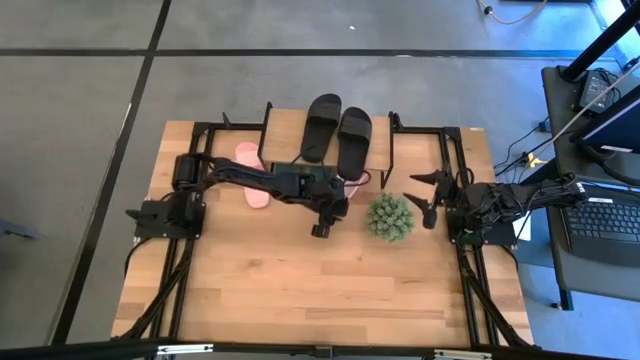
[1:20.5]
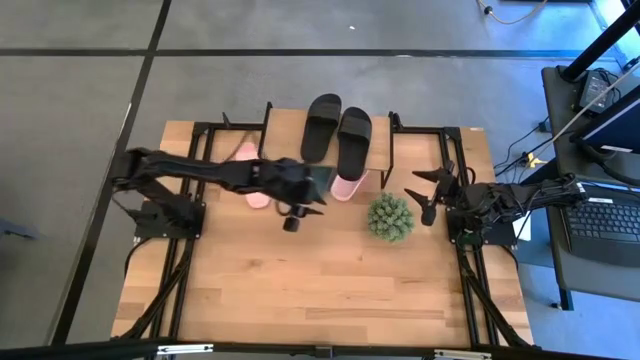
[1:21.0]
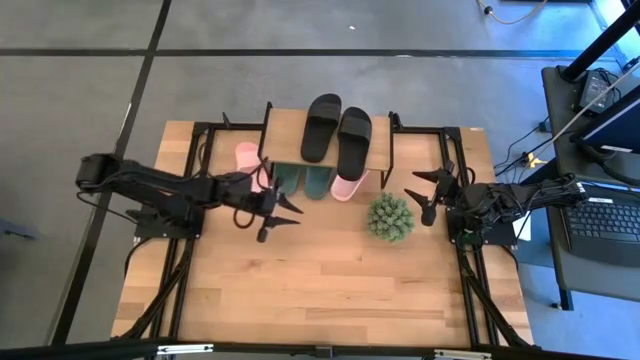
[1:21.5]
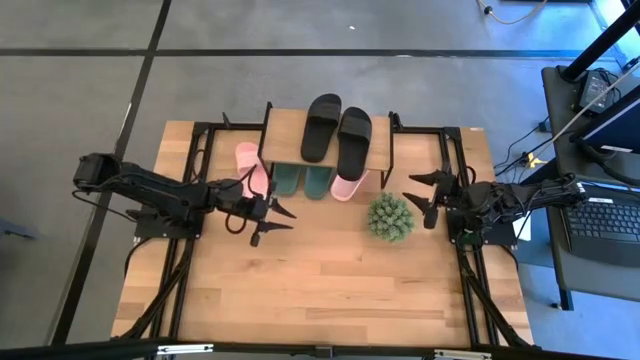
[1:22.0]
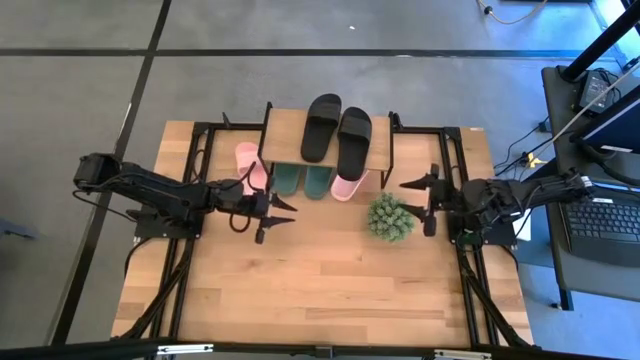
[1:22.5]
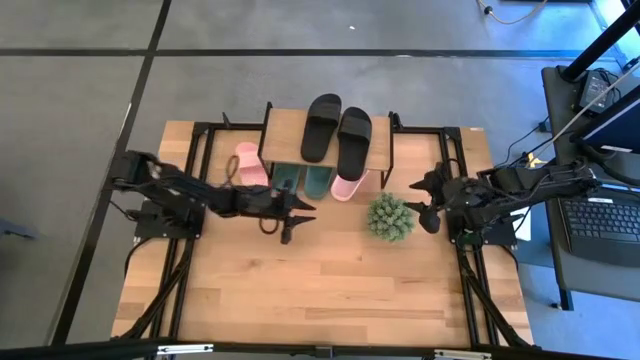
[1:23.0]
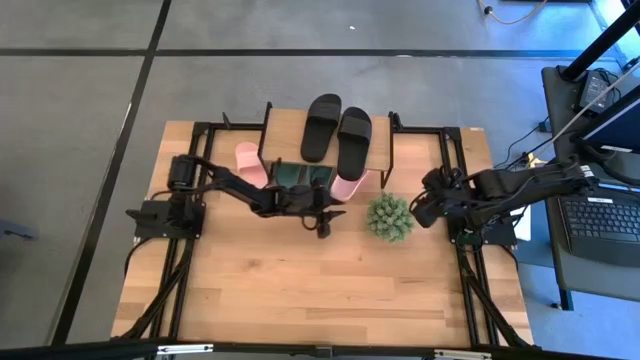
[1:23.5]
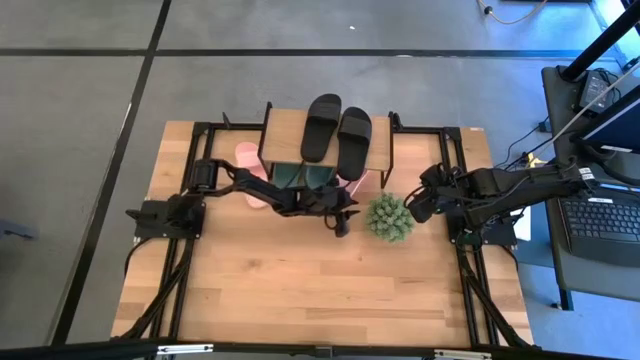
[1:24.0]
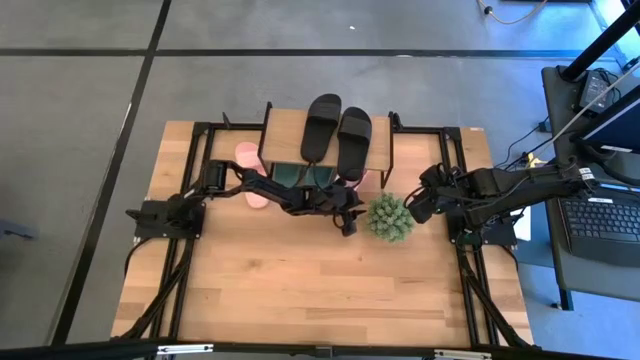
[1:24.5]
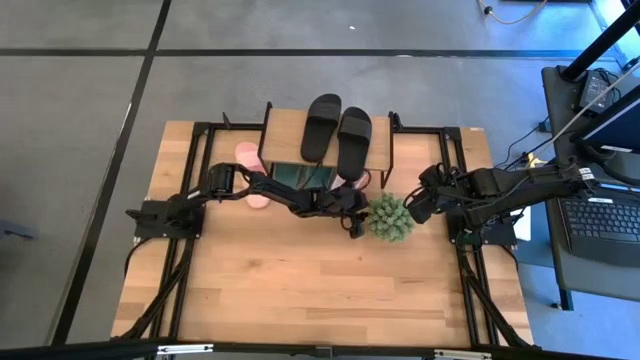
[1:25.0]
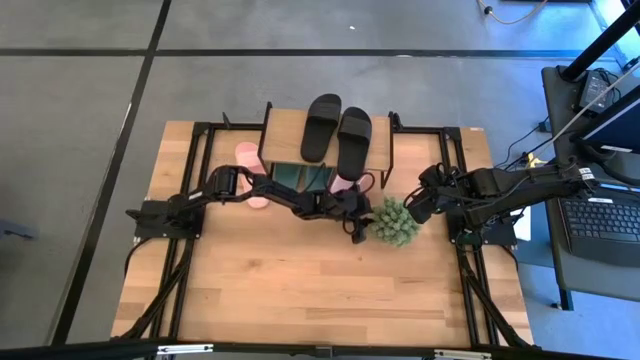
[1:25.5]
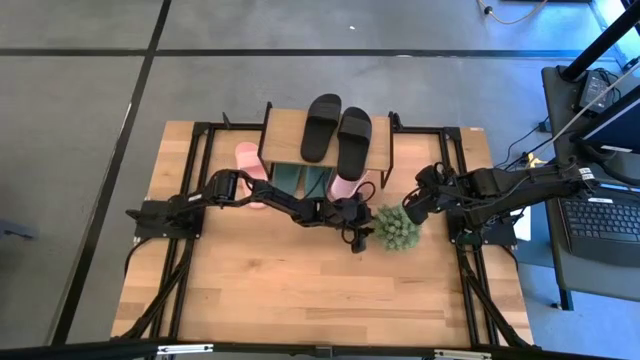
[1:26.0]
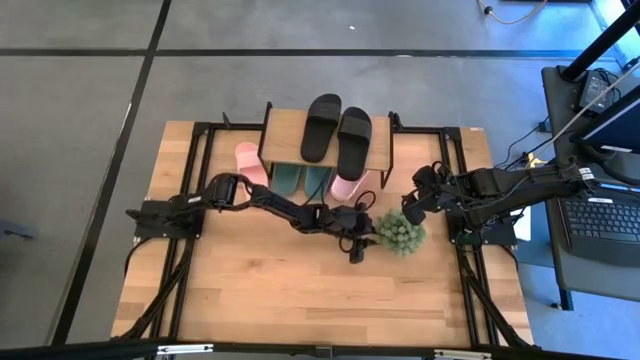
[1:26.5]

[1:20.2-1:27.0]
Task: Pick and place slides into the shelf
Adjust the white decorative plant

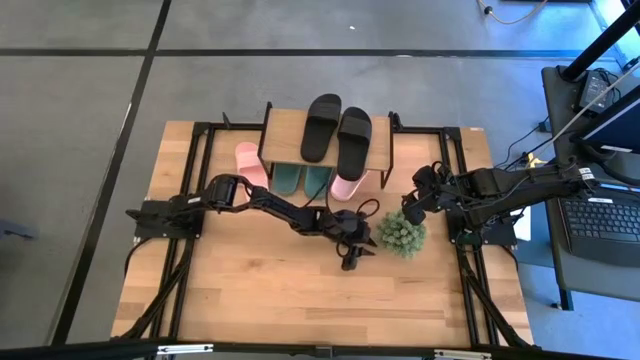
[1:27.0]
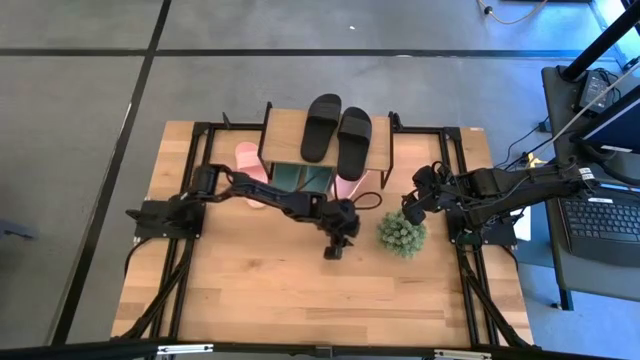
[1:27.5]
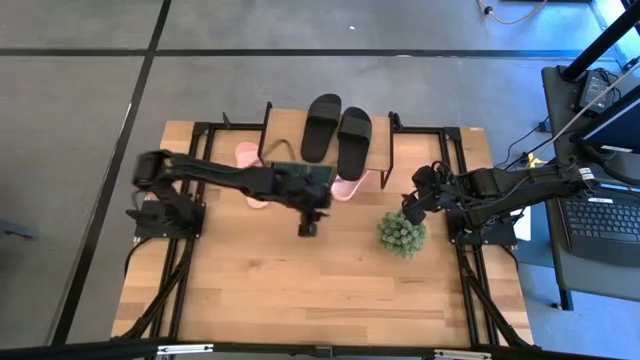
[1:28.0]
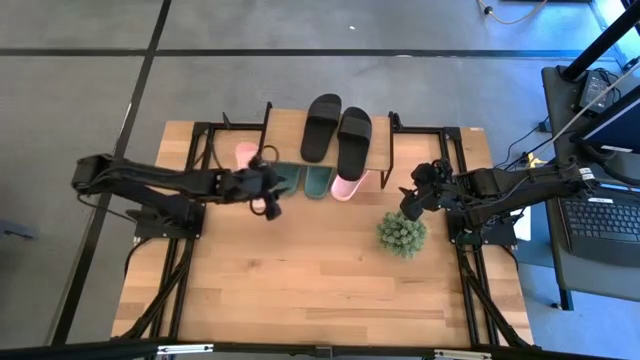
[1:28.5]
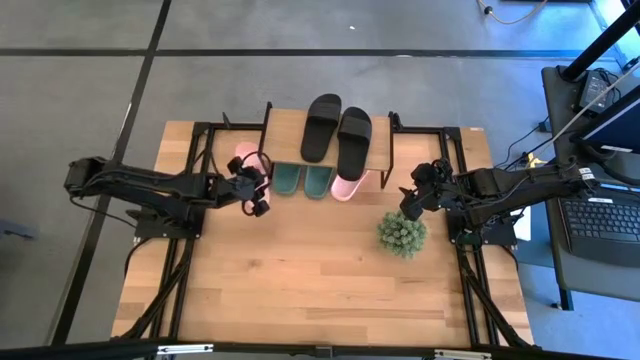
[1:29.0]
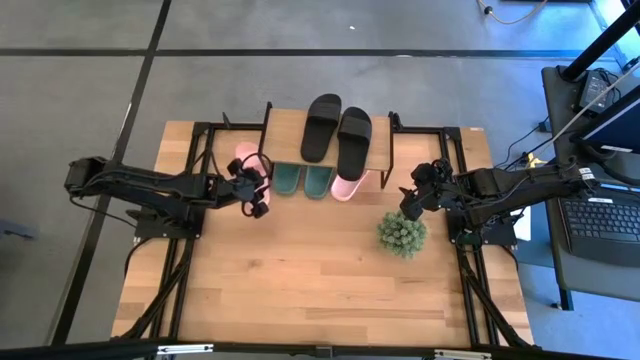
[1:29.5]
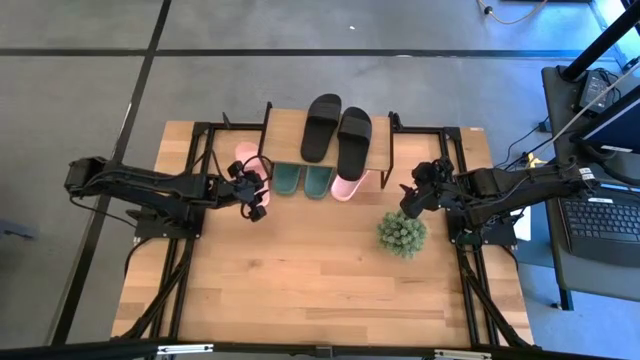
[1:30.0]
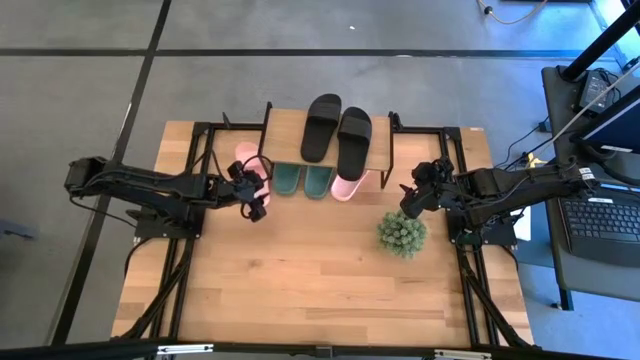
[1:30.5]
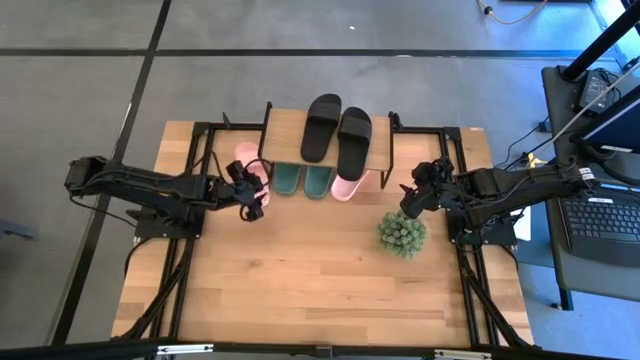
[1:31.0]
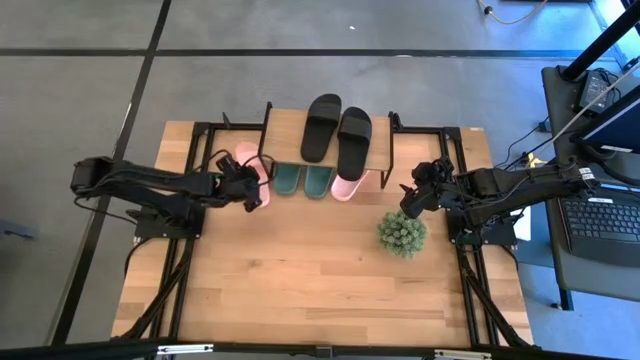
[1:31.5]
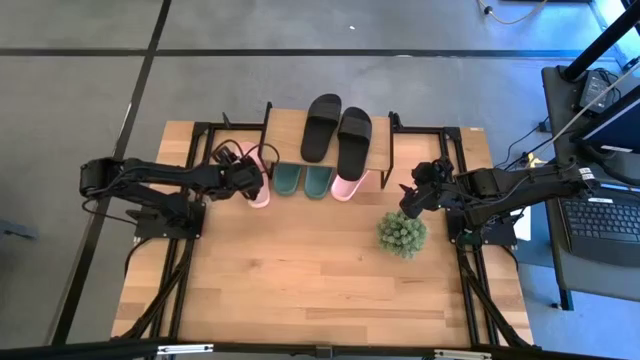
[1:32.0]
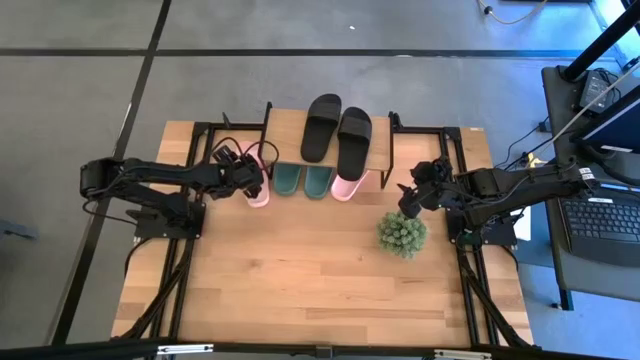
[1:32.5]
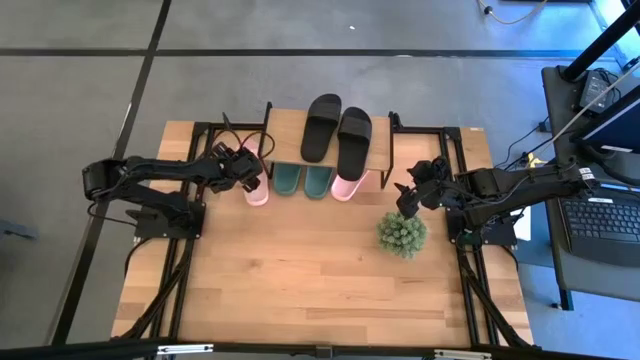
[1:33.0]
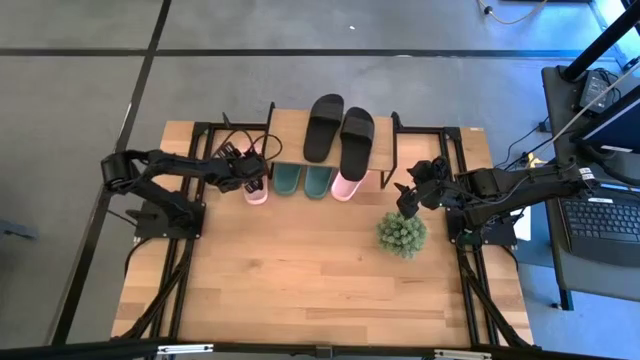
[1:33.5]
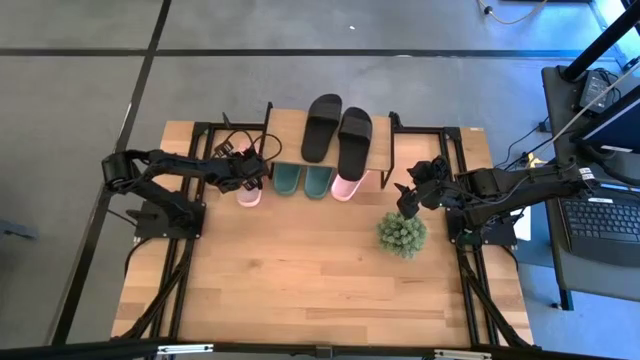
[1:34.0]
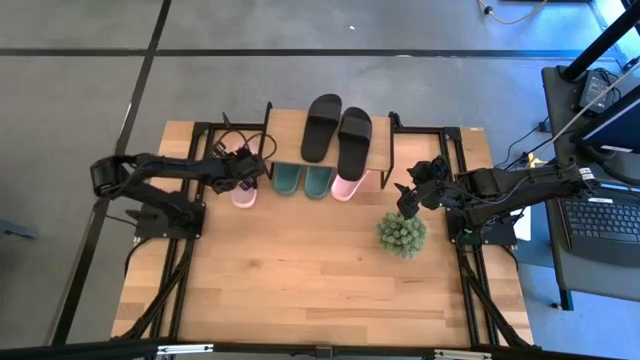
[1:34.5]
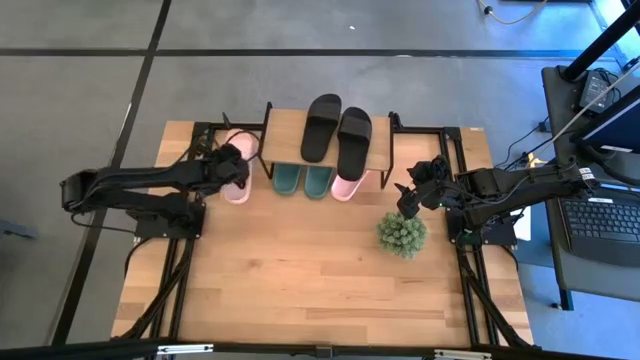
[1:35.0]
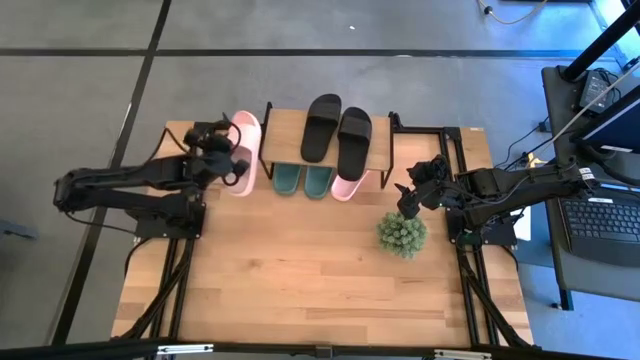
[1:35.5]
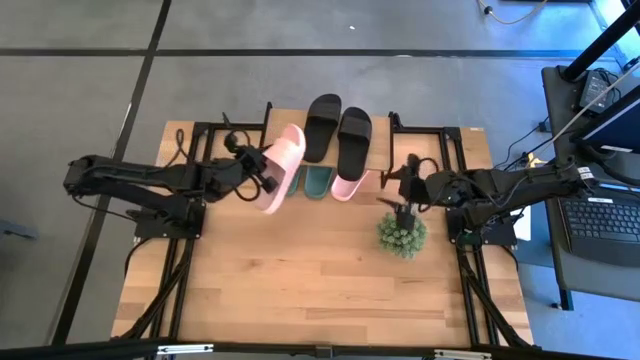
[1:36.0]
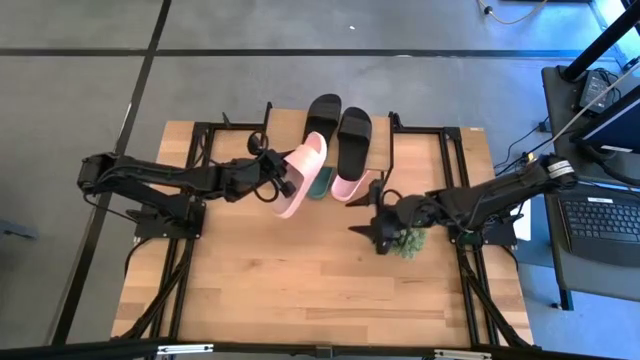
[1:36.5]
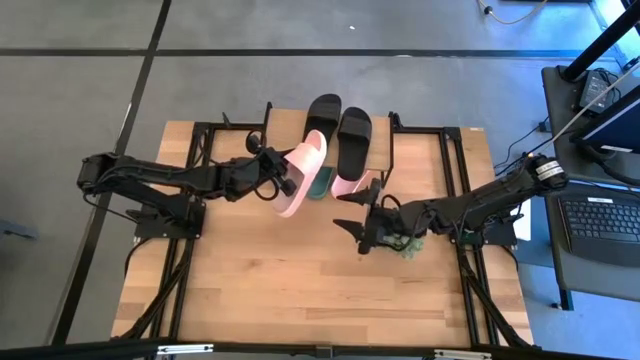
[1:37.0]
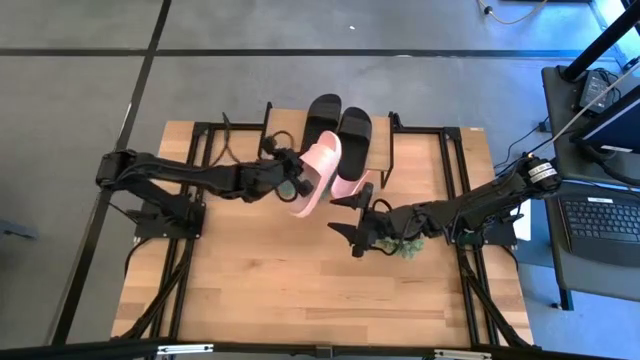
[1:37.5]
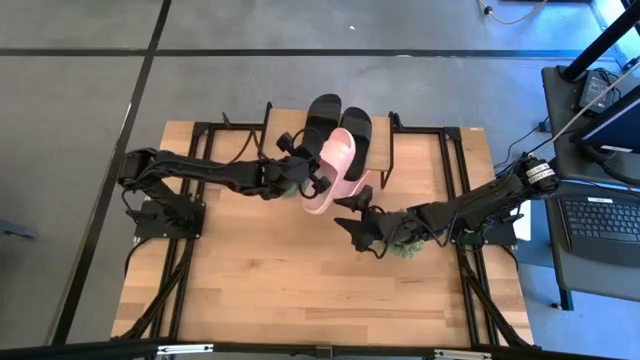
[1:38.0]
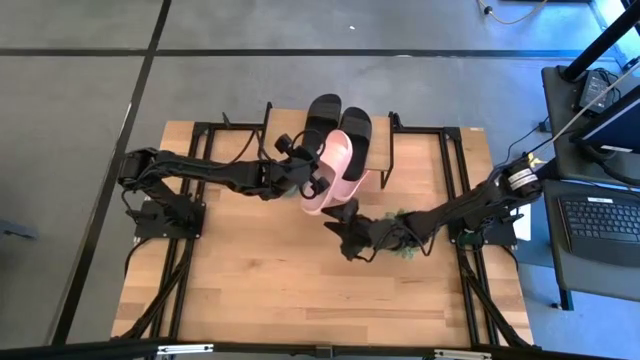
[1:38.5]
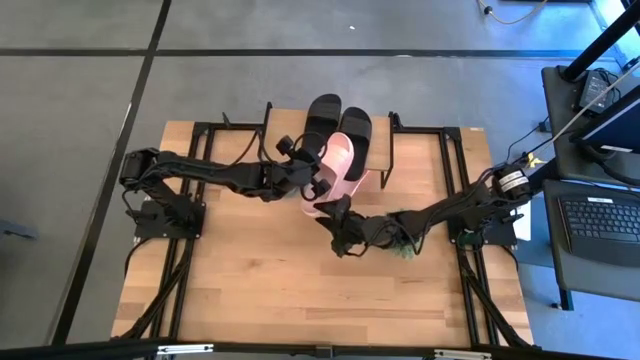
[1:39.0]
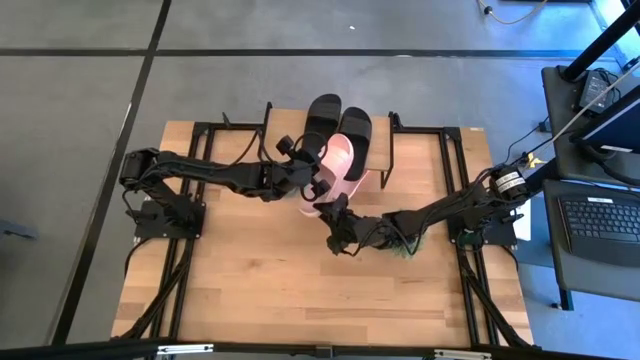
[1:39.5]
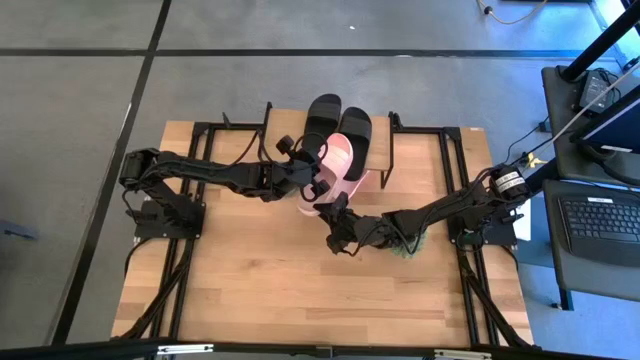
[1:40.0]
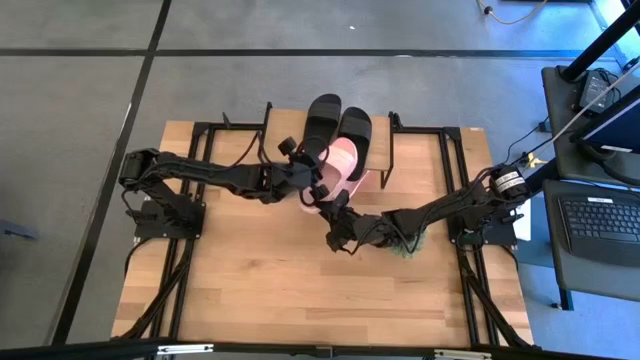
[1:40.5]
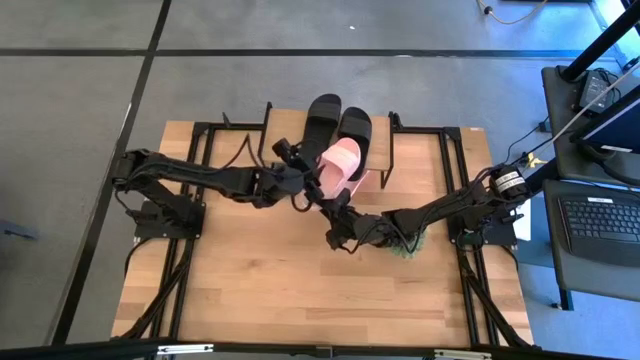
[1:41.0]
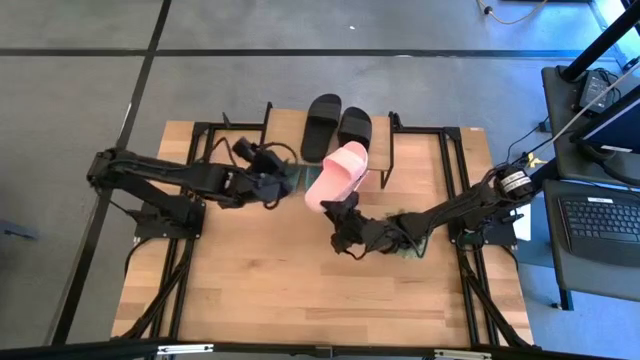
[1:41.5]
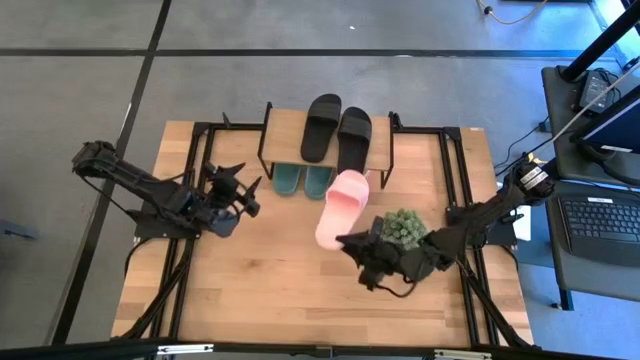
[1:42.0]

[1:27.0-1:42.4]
Put the pink slide under the shelf
